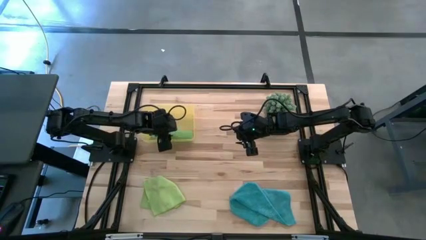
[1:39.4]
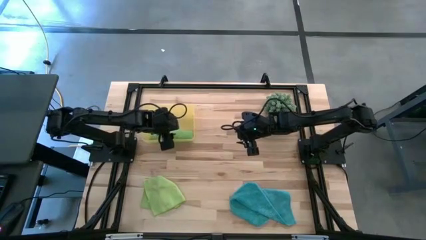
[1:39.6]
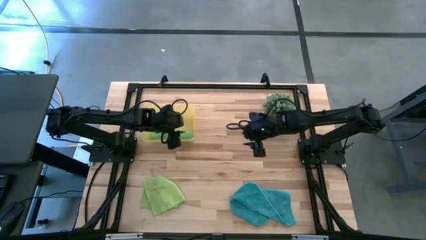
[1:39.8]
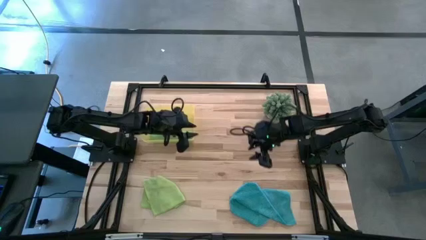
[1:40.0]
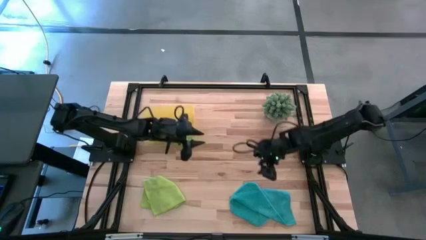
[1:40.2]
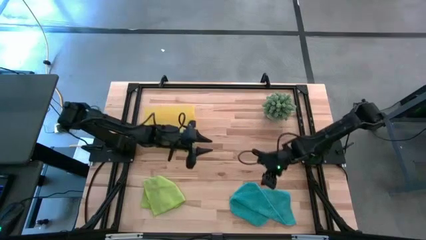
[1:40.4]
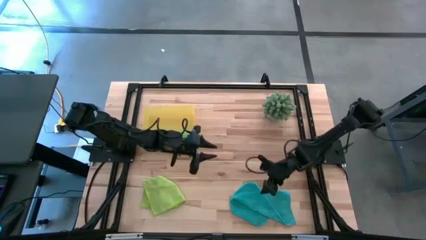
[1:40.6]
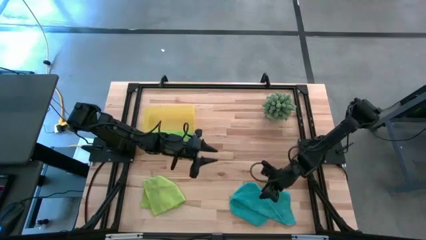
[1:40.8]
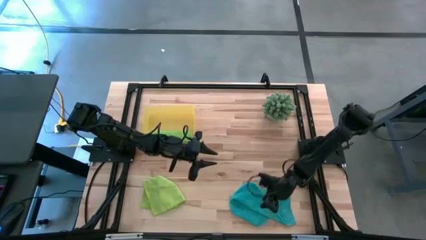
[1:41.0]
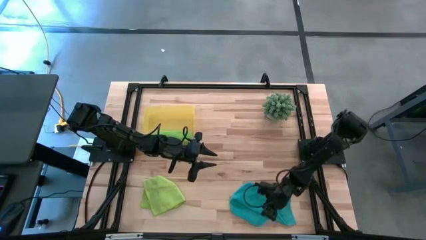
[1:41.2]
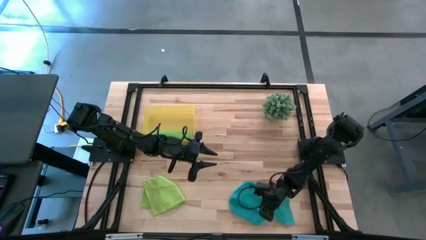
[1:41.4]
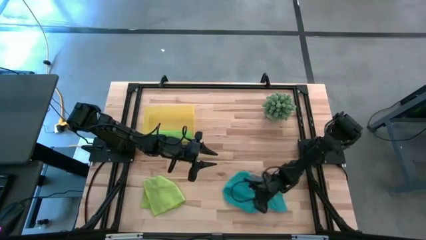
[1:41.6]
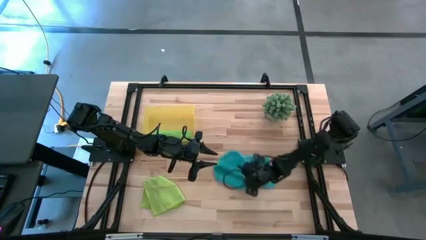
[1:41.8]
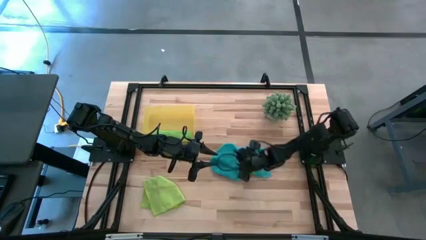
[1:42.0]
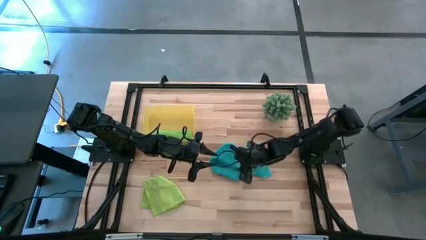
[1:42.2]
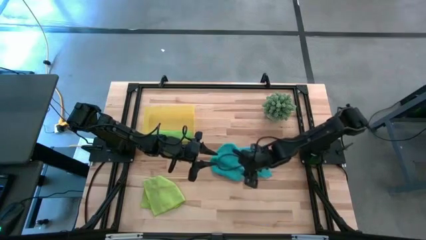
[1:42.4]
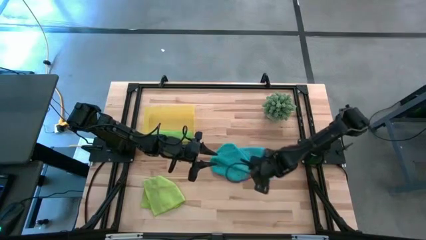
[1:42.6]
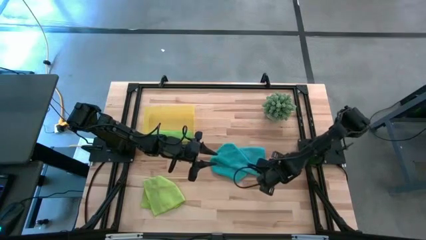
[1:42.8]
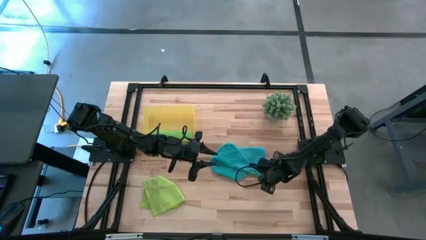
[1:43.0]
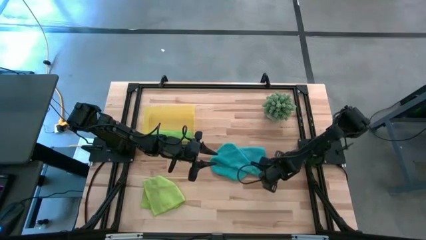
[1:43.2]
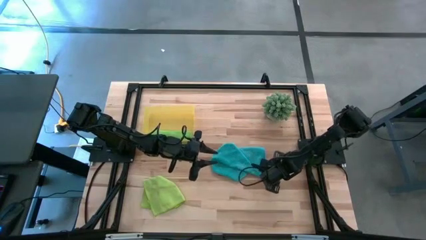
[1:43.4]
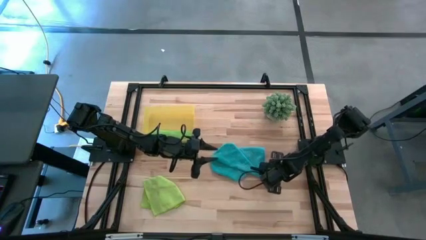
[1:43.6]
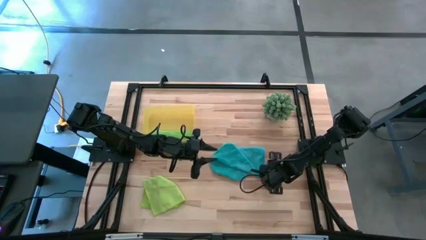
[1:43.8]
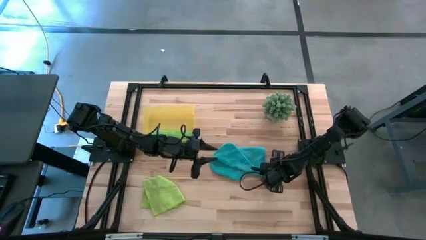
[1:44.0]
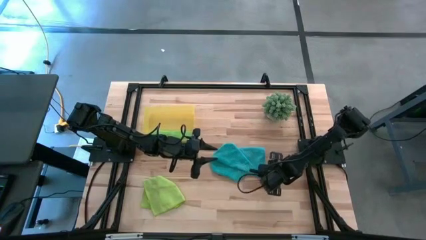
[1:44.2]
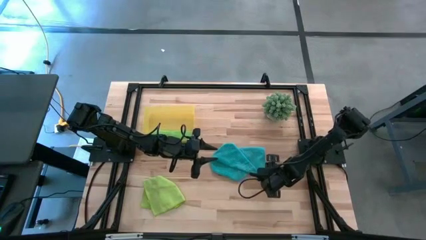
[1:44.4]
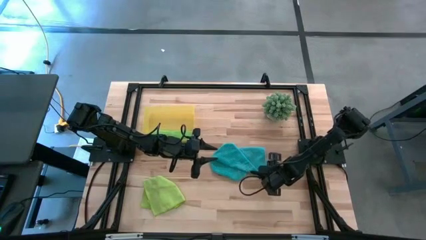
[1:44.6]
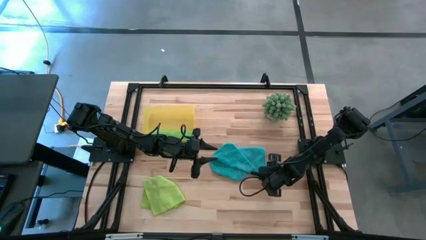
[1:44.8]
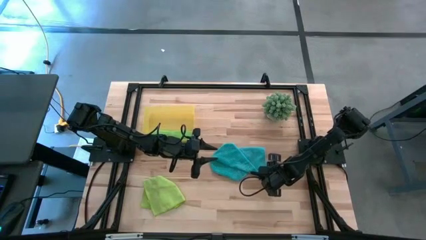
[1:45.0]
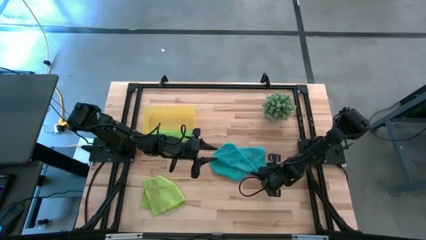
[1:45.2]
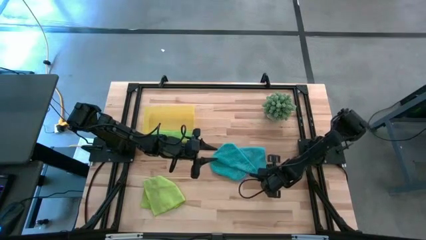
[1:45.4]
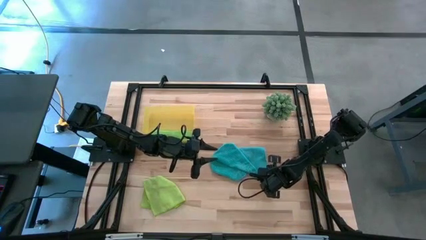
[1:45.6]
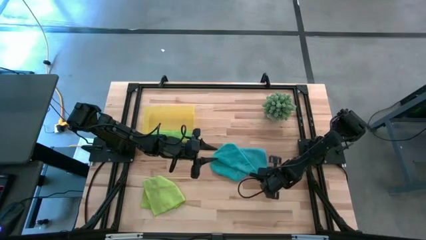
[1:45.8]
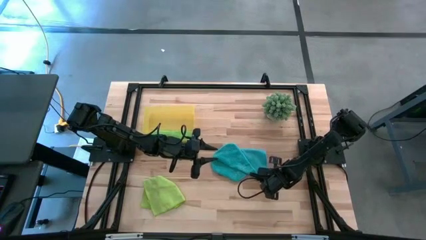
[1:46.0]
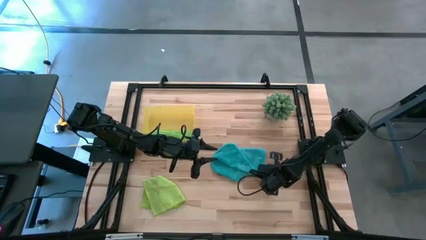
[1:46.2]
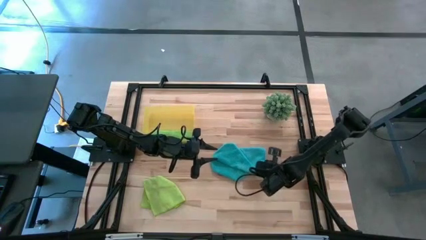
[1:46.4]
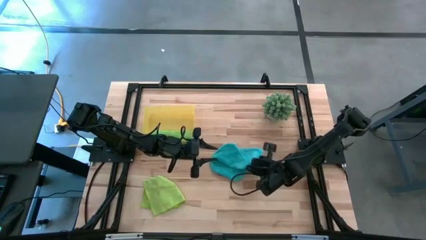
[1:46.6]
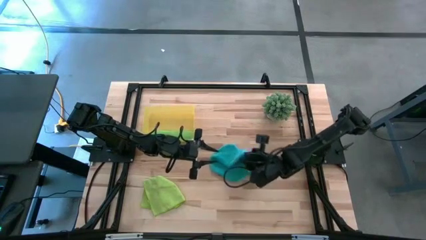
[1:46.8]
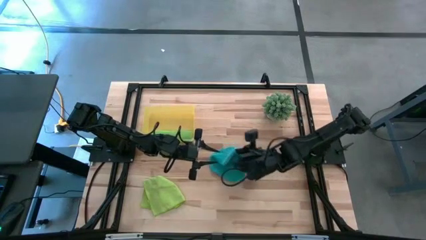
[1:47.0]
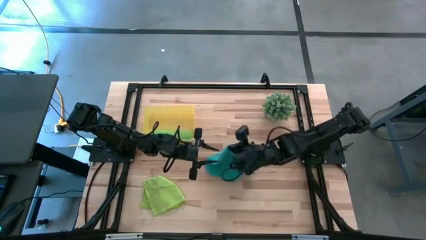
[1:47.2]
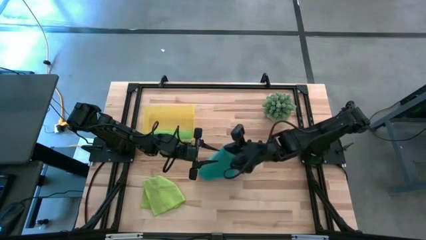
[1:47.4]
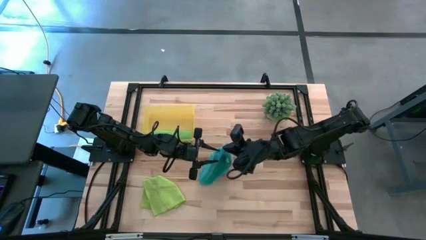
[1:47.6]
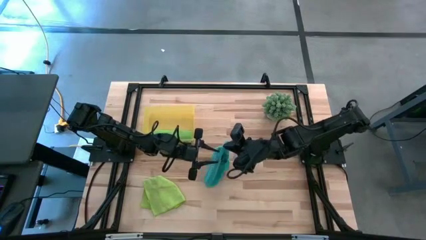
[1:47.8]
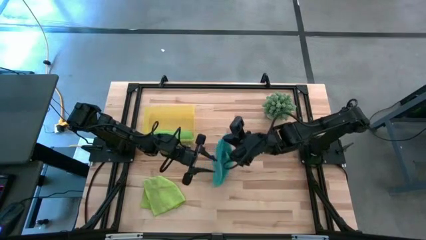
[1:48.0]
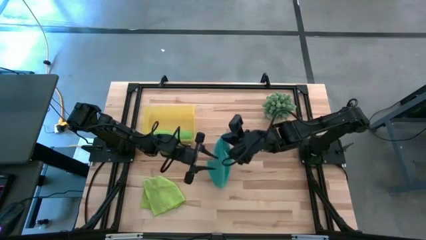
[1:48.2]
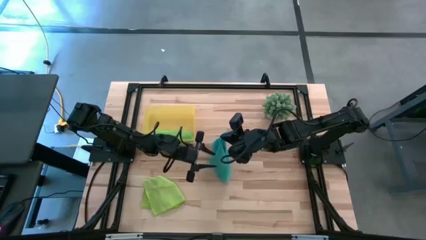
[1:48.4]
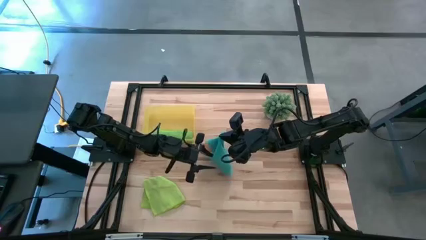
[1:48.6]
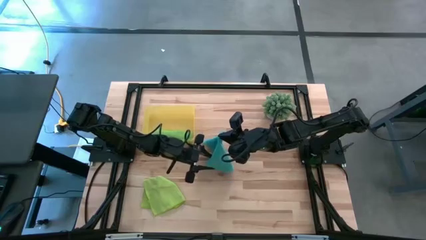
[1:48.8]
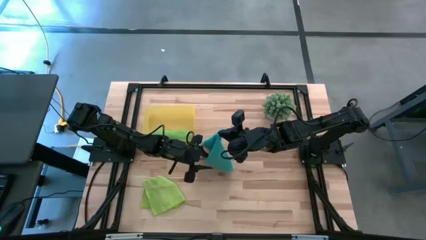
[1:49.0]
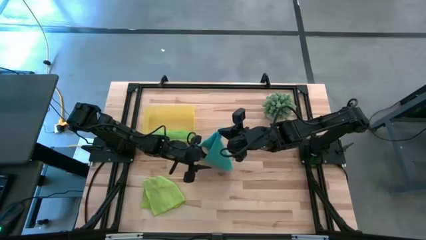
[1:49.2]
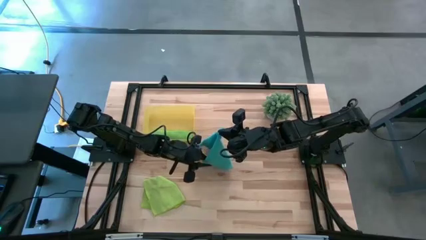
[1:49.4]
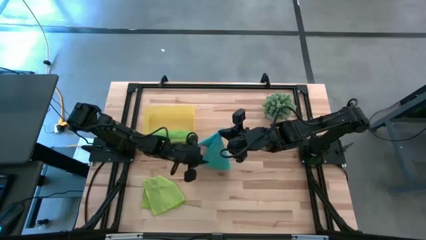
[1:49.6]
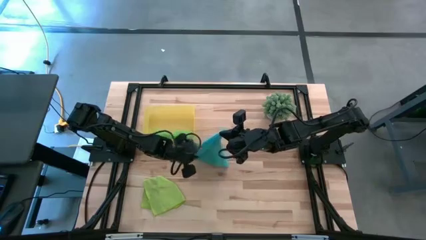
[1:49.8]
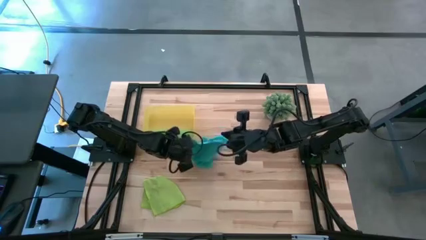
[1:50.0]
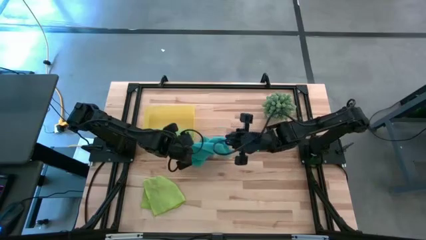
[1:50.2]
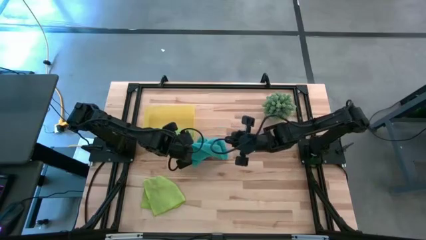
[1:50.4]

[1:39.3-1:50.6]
Task: Roll microfiber towels into tight, uniform cylinder then place into a basket
Fold the blue microfiber towel

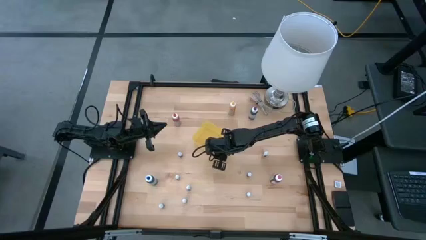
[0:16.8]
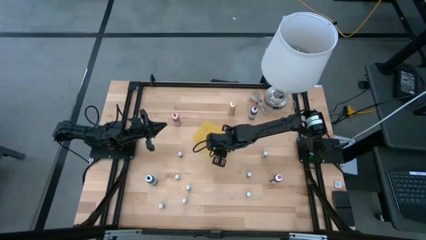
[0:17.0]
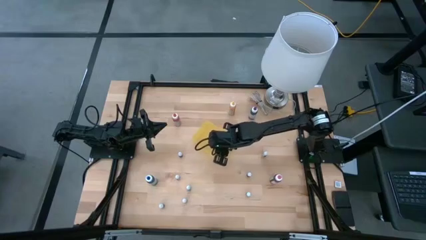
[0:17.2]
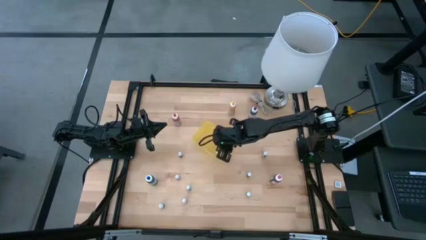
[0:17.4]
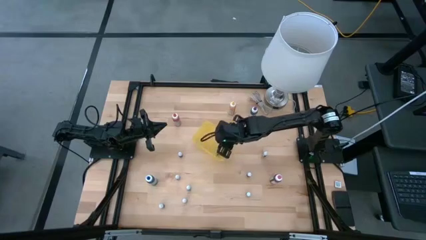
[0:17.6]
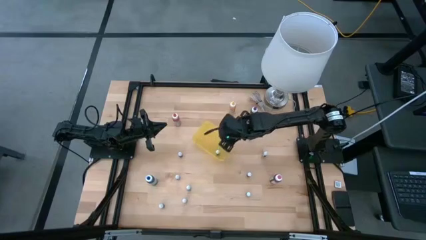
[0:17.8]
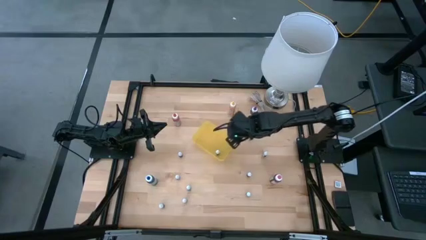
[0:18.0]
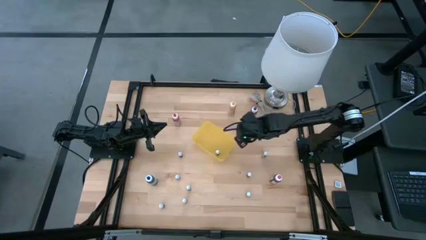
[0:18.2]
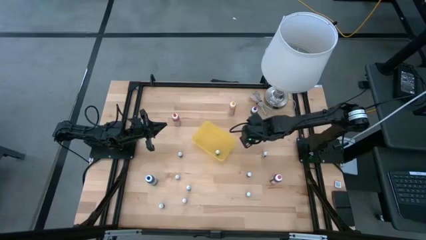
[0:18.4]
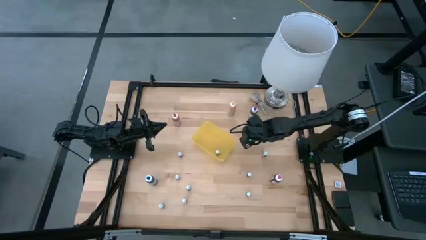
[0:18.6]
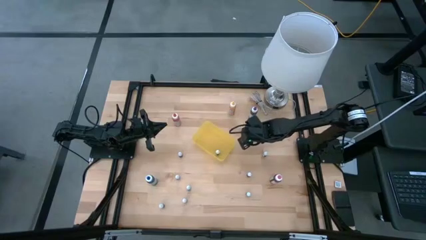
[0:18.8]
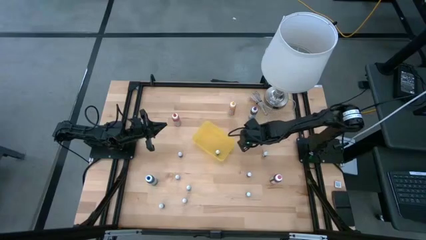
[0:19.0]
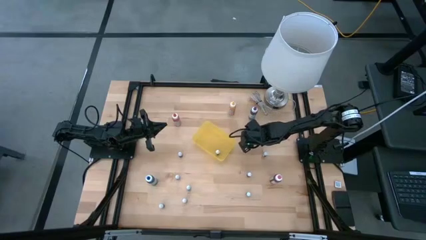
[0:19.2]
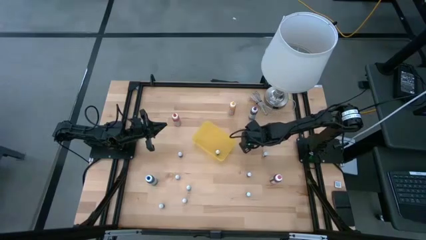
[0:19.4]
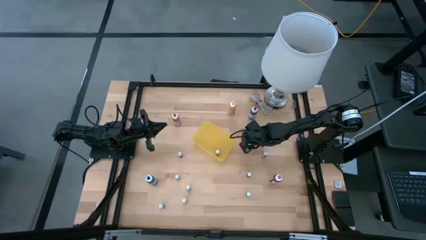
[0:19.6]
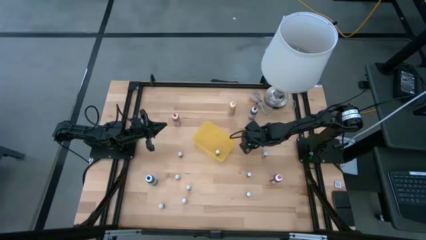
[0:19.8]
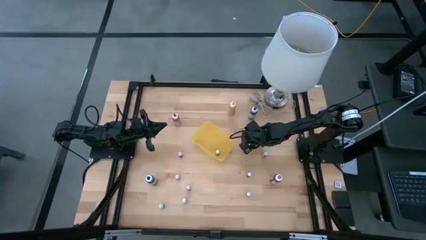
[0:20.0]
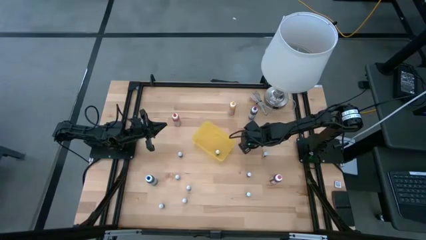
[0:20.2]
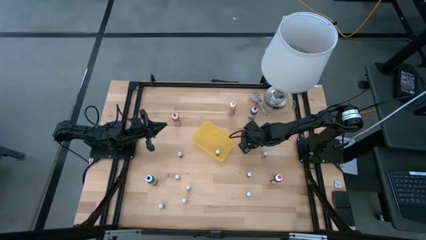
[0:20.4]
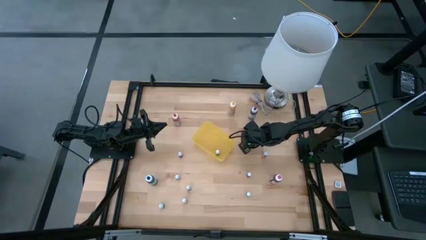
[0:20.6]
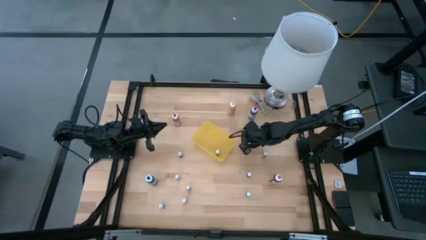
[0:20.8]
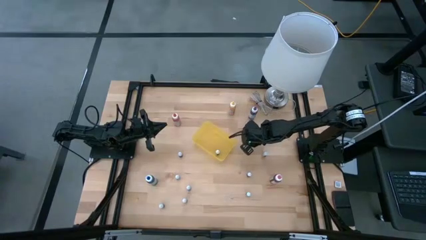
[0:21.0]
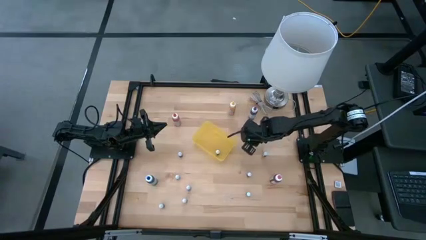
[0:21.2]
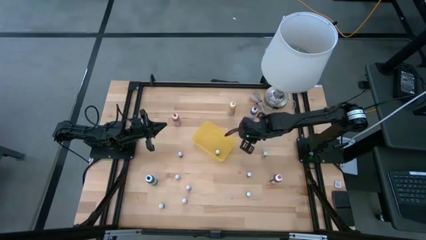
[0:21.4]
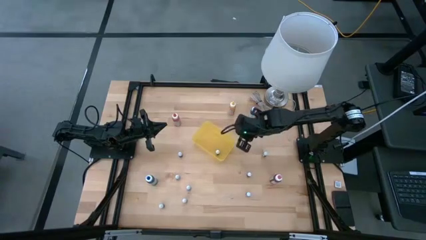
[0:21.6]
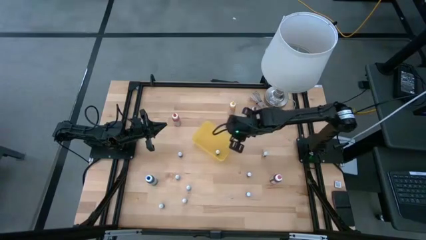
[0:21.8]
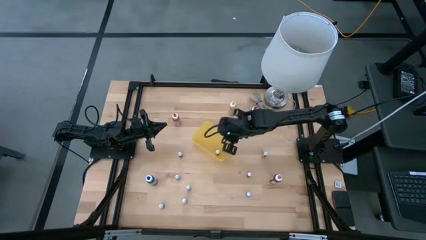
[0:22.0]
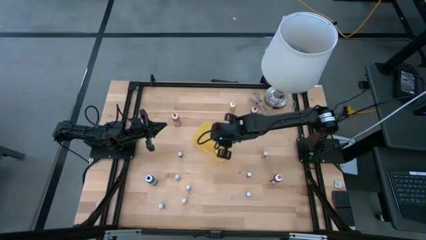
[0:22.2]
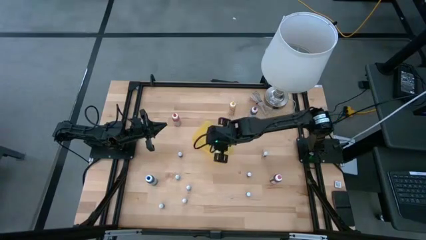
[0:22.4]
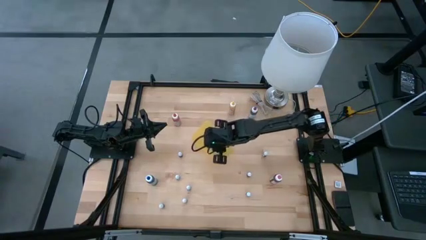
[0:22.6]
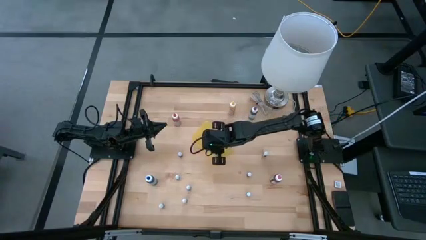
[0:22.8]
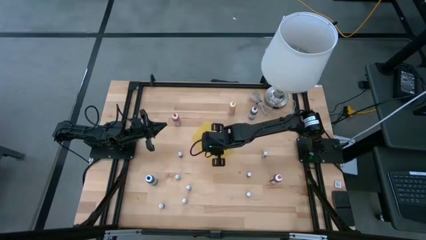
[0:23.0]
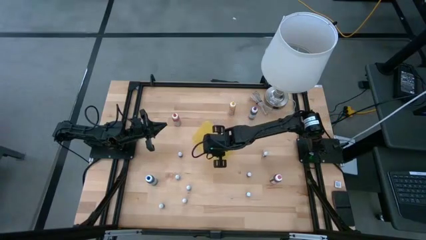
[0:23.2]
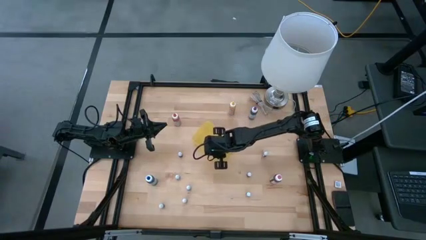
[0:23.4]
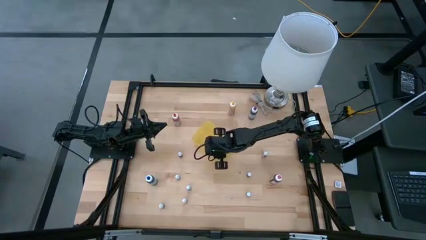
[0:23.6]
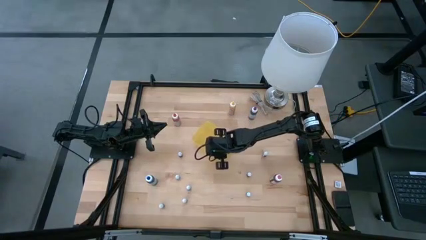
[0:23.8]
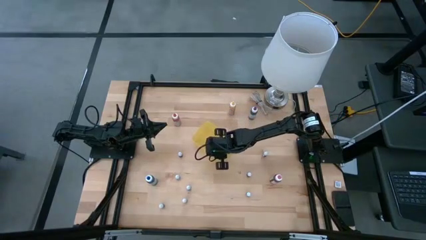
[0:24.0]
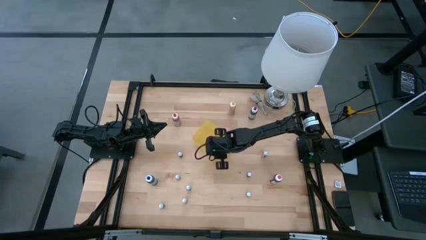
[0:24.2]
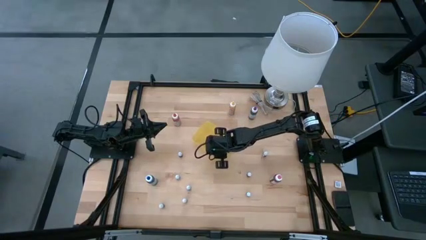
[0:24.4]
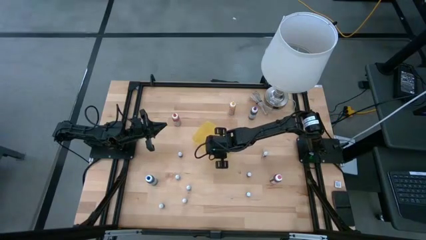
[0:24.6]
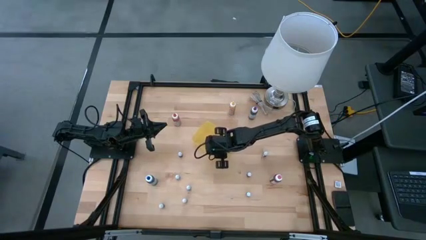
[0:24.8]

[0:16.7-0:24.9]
Task: Pick & Place food coloring
Put the small red food coloring bottle into the yellow bin
